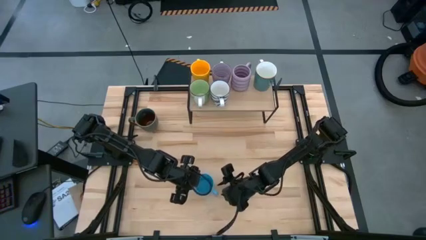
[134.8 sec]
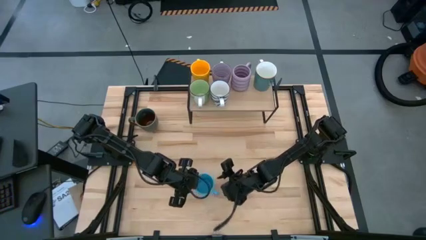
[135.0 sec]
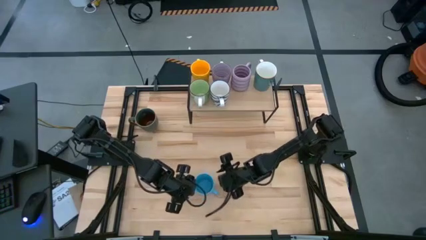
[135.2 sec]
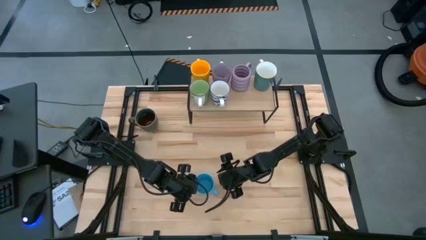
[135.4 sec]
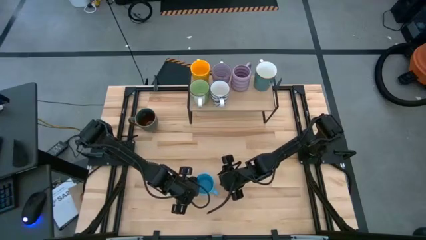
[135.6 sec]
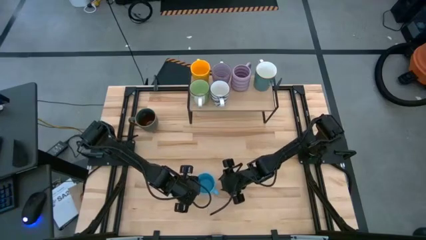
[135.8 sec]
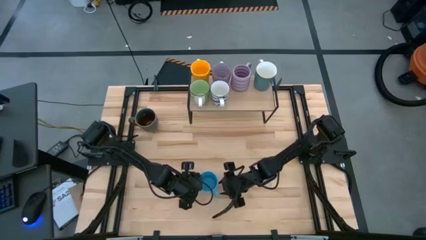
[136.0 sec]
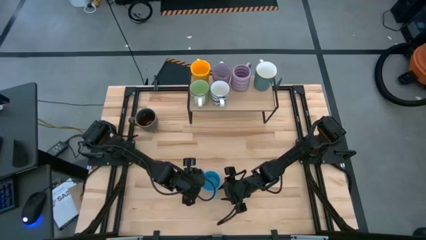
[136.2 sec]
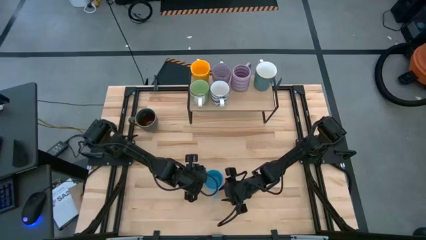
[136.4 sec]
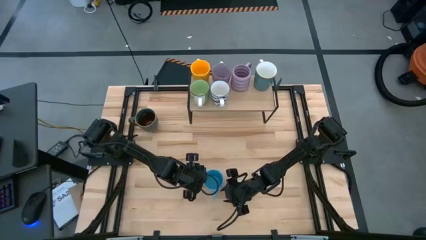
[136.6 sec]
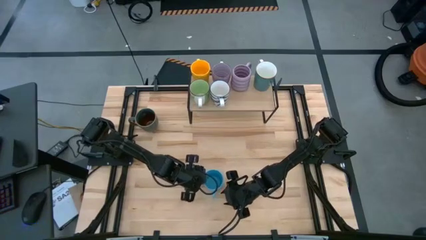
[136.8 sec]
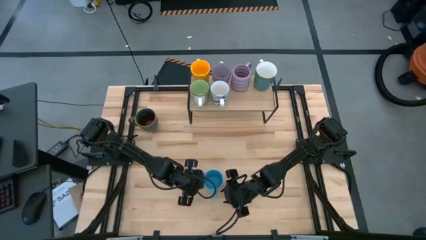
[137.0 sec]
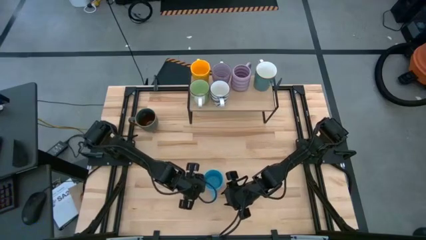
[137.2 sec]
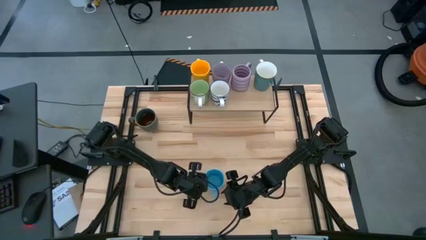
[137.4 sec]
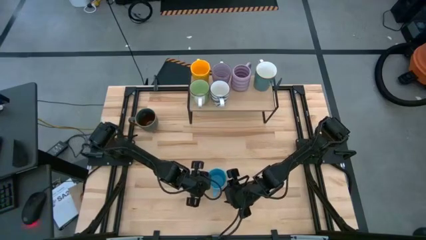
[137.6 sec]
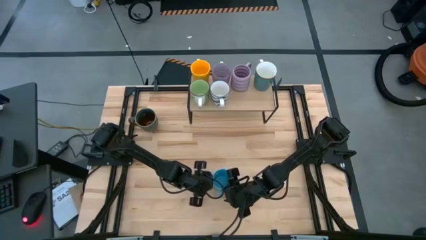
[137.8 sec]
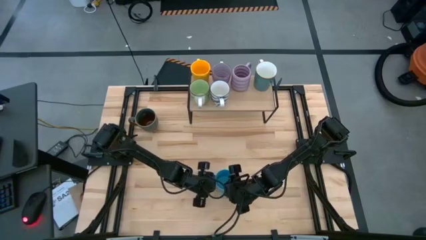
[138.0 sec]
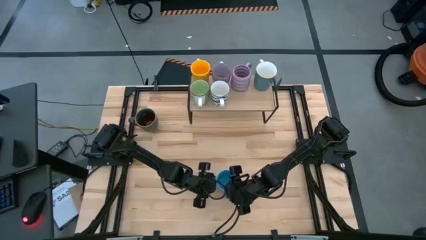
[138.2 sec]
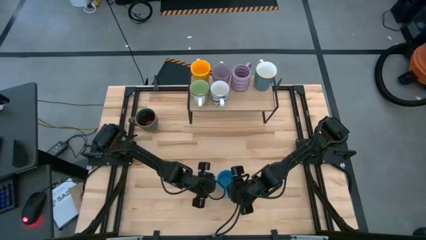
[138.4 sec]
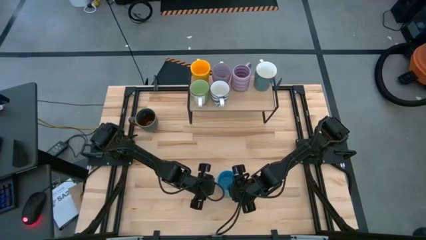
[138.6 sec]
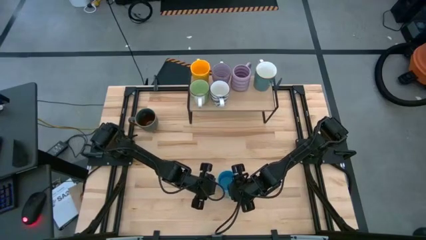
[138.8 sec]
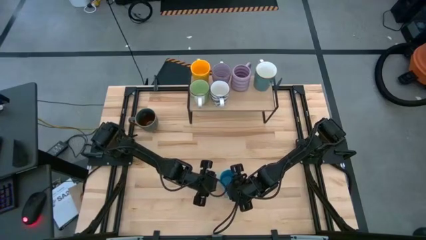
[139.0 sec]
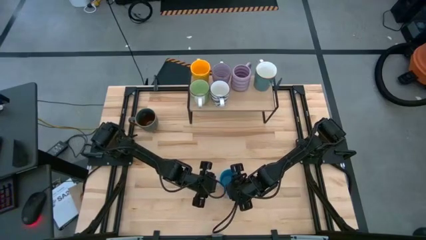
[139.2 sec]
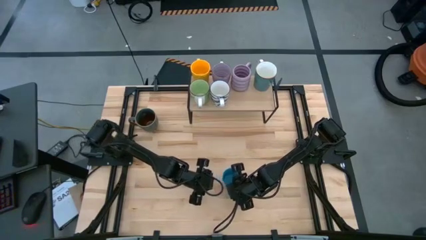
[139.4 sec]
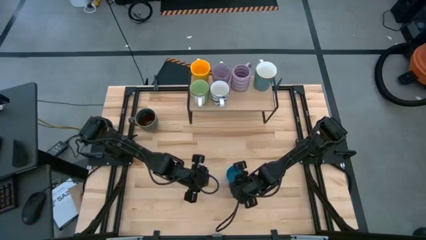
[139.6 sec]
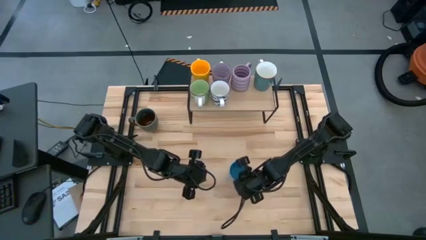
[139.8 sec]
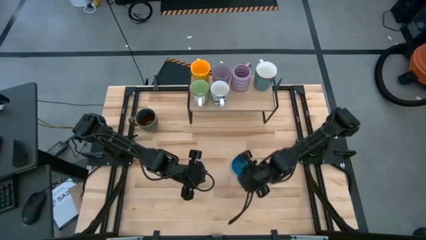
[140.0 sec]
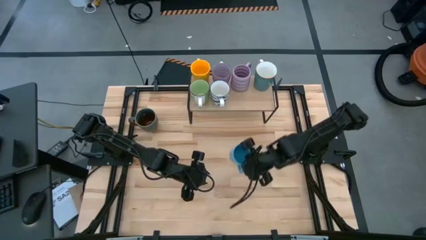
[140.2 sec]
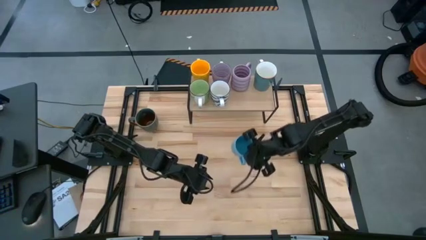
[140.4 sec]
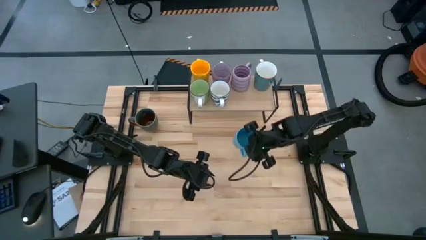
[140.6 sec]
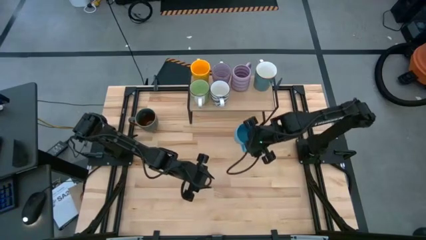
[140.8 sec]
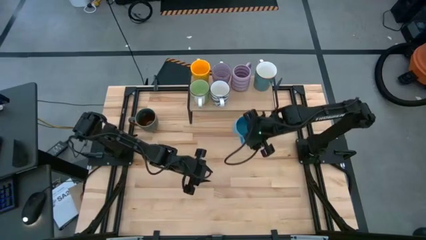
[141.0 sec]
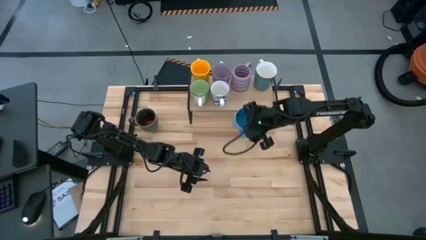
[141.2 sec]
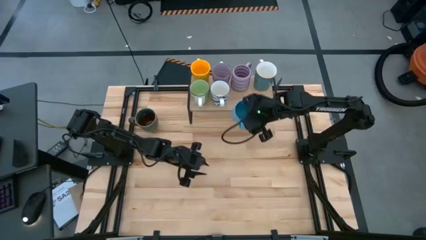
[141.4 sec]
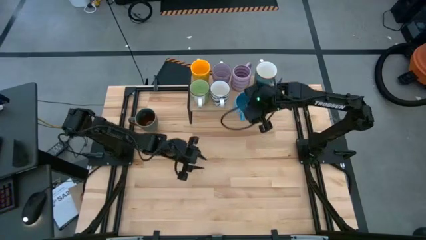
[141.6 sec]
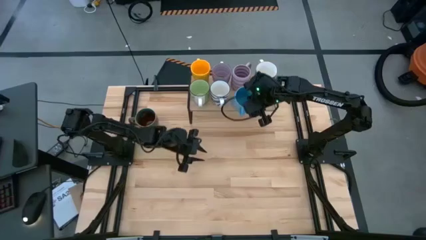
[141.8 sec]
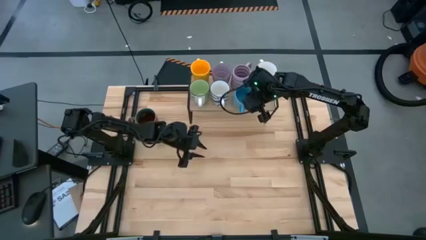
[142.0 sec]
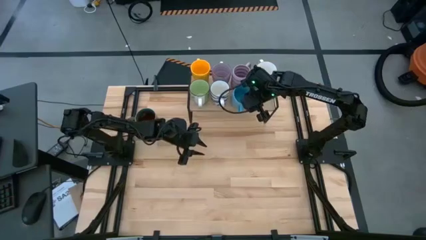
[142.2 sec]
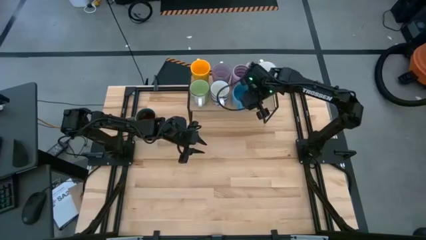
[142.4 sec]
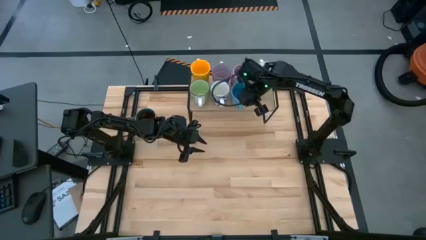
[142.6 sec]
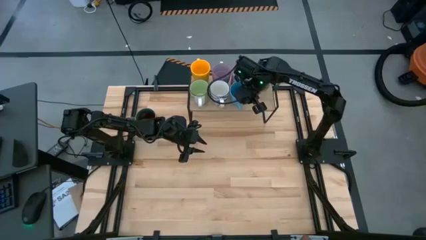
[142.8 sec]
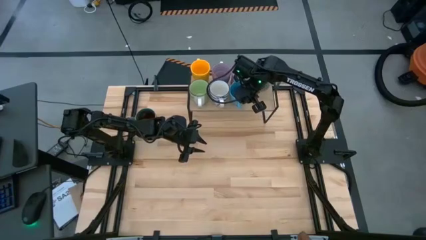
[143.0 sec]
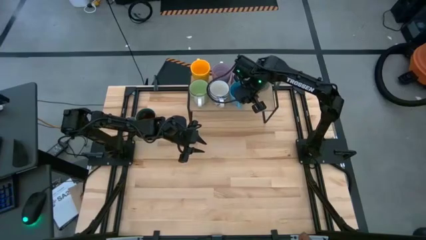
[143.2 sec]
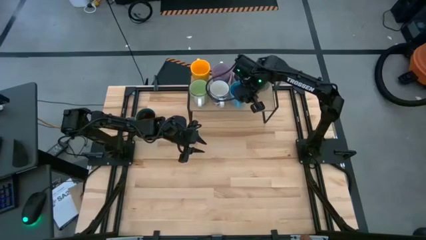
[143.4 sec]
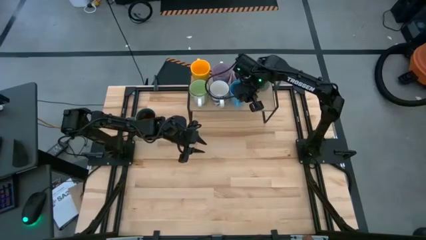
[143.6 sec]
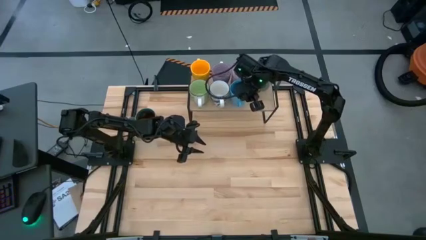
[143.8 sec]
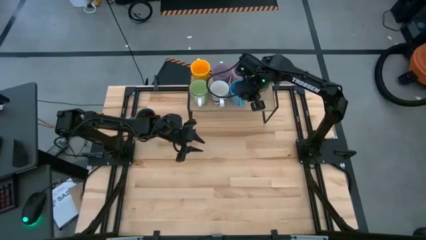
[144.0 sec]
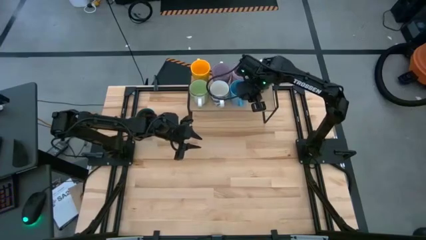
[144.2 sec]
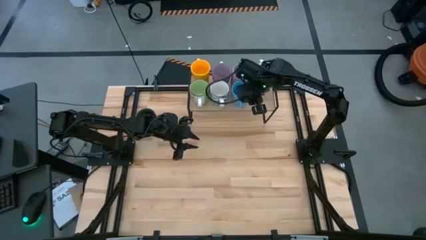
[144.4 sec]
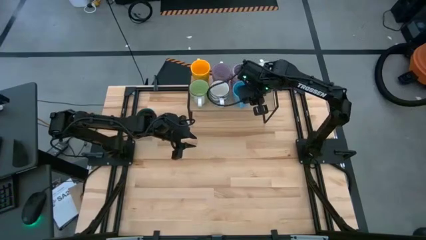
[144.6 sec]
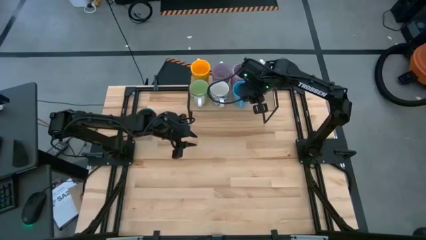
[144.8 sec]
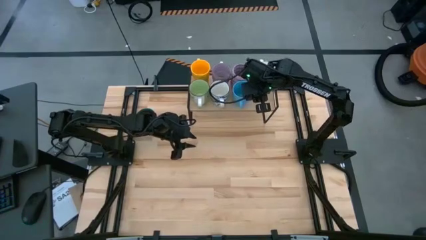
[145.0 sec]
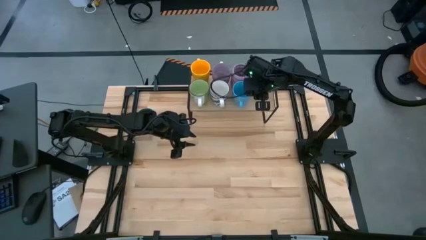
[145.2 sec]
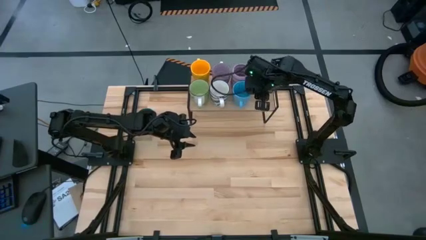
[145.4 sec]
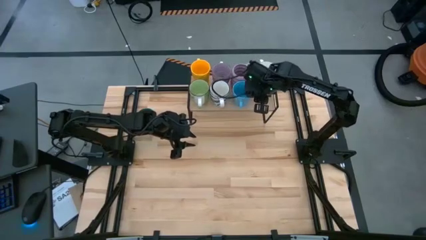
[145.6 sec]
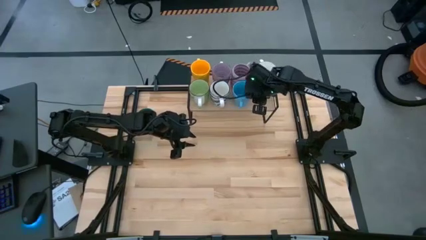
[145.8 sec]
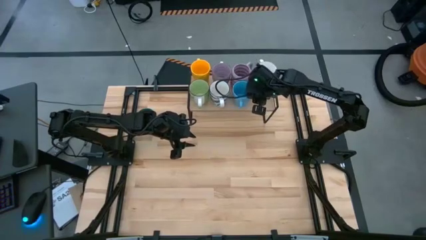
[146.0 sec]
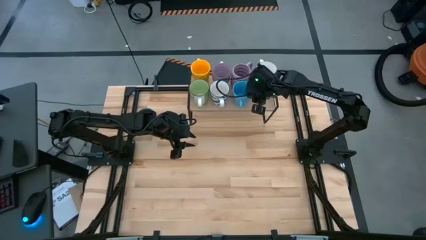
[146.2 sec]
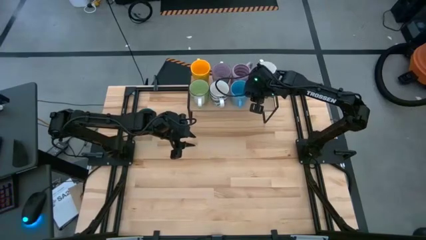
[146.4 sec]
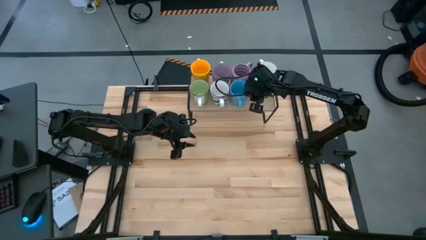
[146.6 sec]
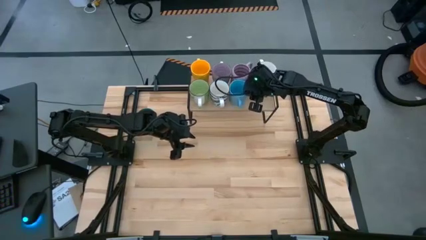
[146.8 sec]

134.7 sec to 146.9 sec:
Task: Place coffee mugs
Put the light blue mug on the shelf
